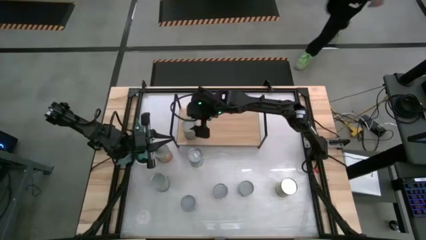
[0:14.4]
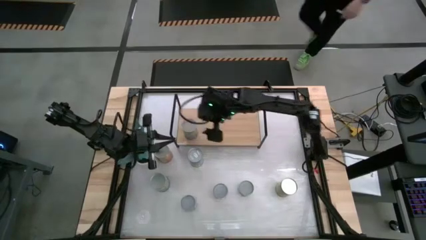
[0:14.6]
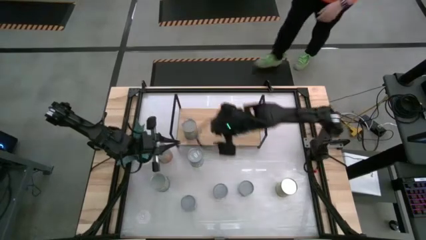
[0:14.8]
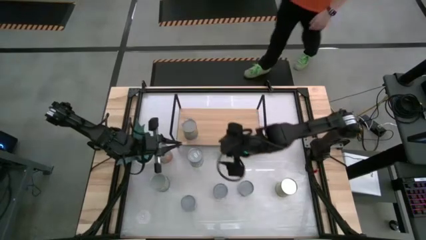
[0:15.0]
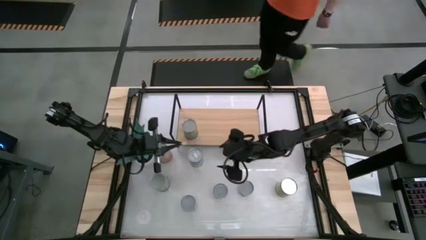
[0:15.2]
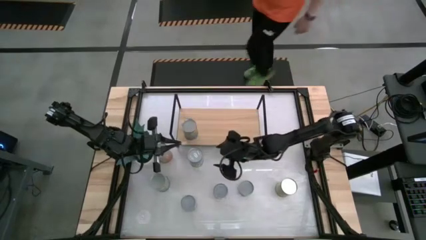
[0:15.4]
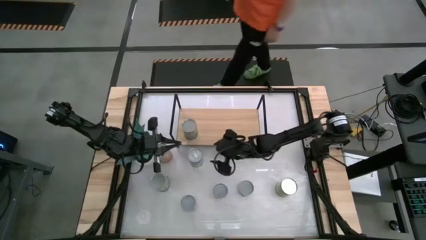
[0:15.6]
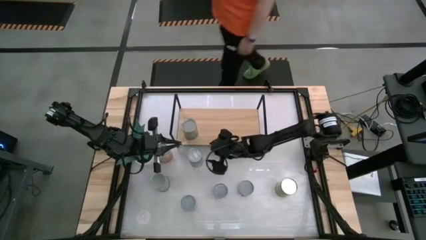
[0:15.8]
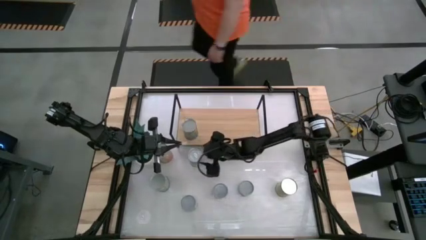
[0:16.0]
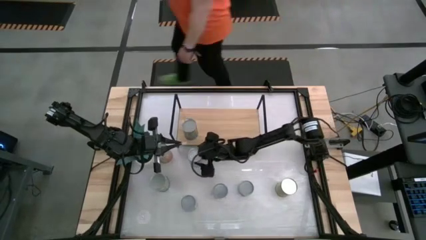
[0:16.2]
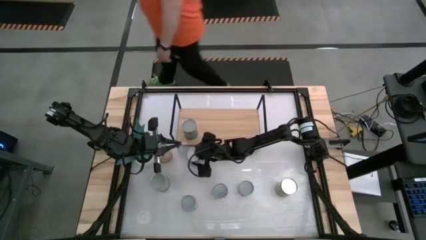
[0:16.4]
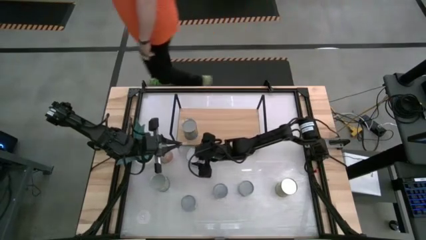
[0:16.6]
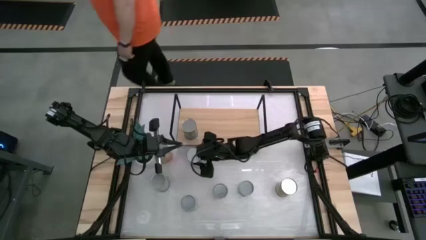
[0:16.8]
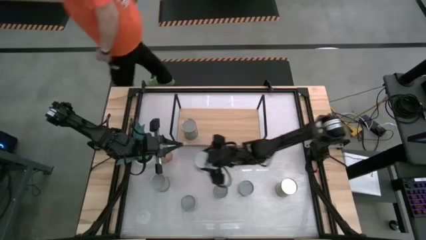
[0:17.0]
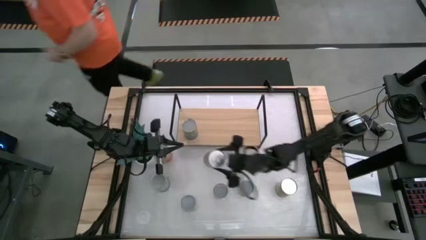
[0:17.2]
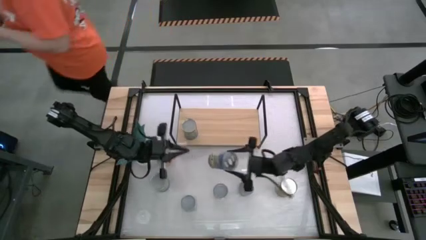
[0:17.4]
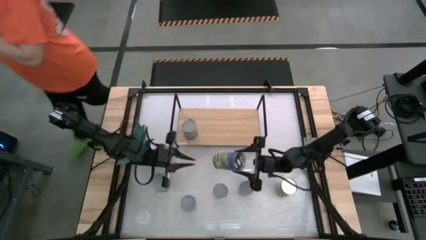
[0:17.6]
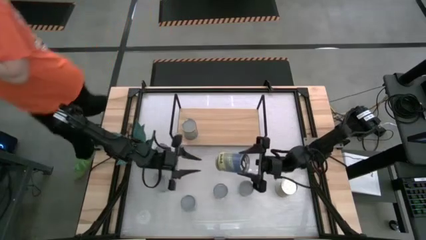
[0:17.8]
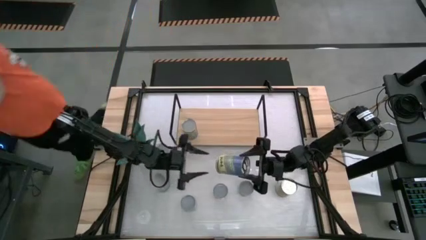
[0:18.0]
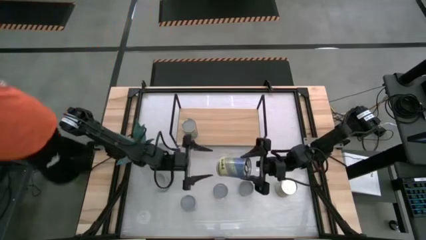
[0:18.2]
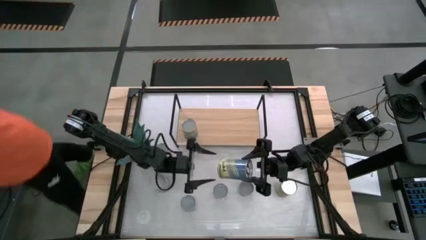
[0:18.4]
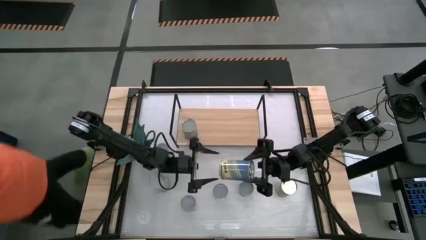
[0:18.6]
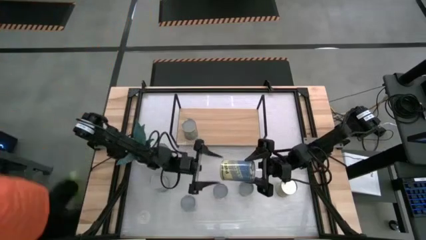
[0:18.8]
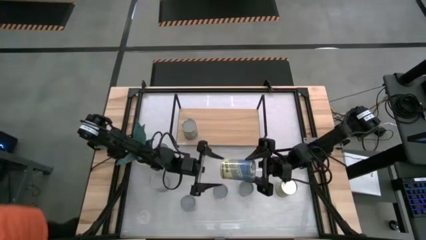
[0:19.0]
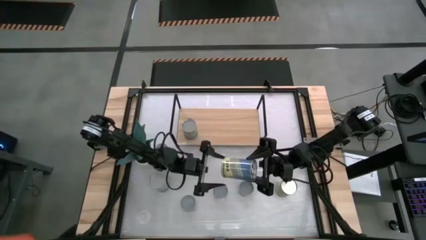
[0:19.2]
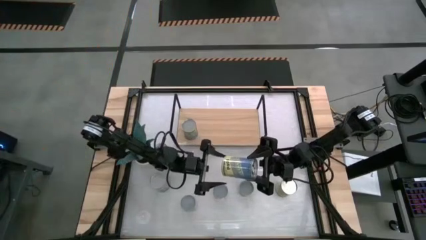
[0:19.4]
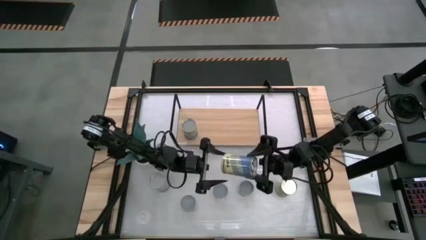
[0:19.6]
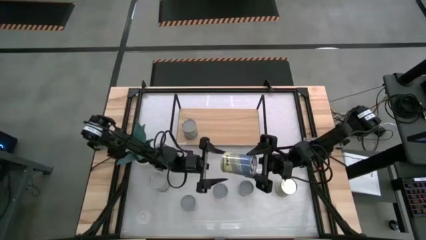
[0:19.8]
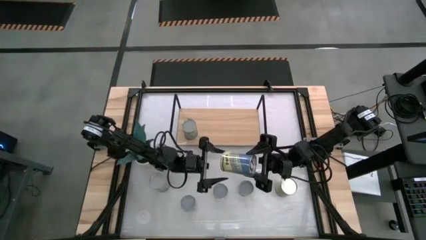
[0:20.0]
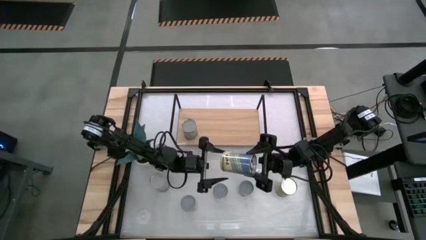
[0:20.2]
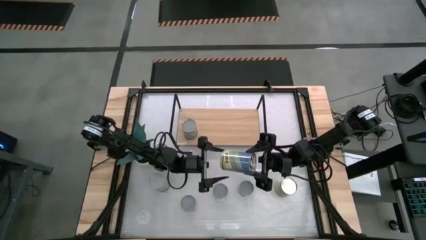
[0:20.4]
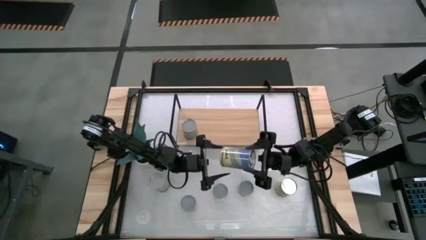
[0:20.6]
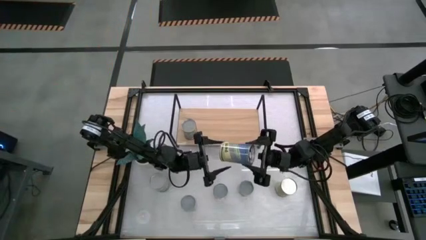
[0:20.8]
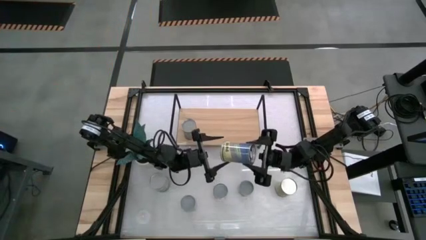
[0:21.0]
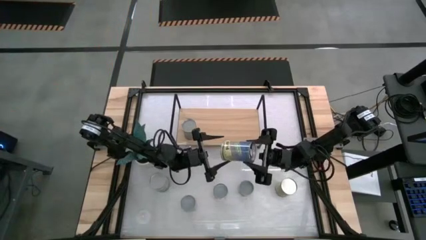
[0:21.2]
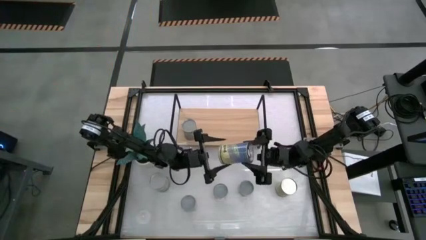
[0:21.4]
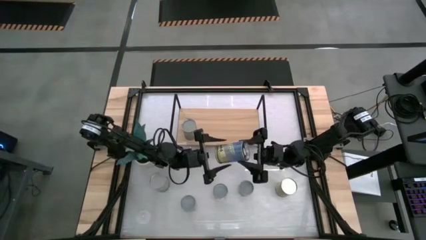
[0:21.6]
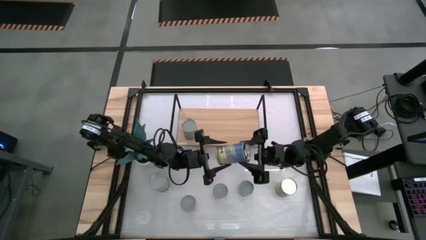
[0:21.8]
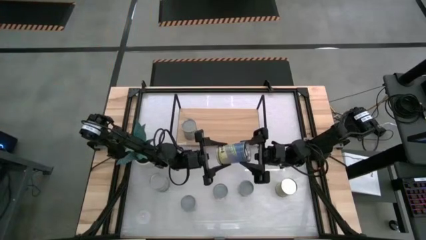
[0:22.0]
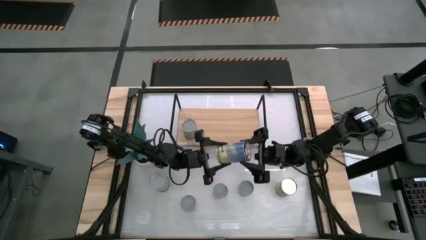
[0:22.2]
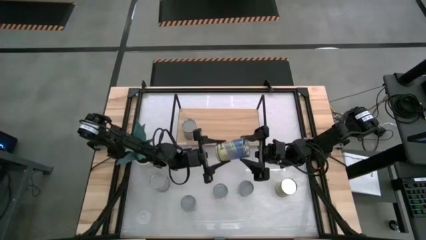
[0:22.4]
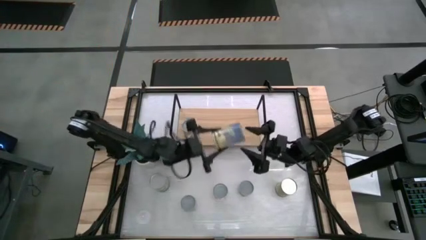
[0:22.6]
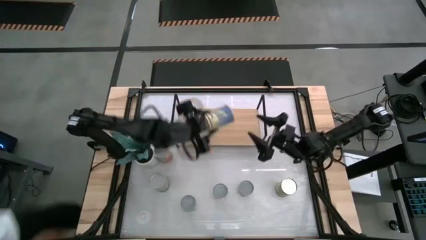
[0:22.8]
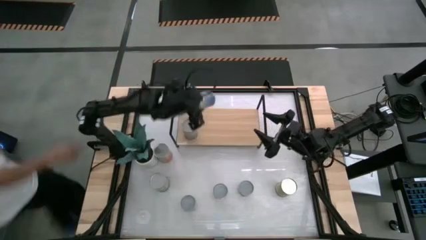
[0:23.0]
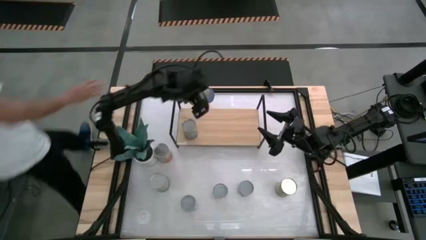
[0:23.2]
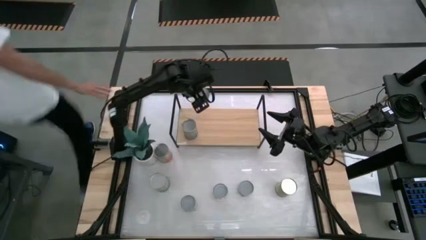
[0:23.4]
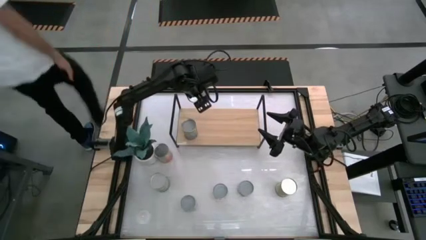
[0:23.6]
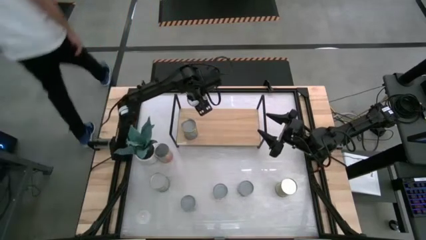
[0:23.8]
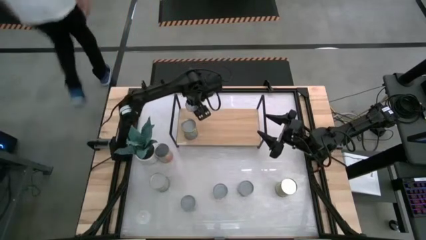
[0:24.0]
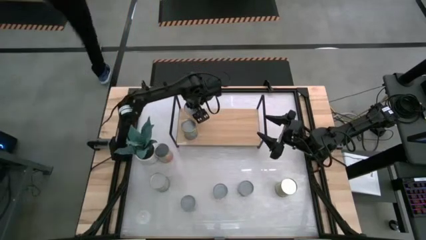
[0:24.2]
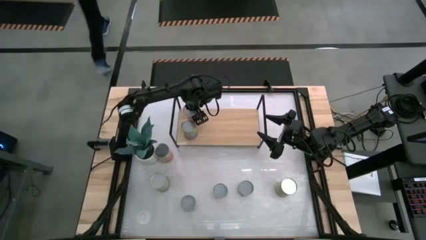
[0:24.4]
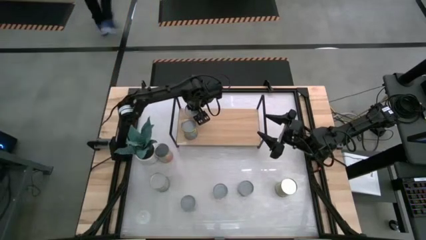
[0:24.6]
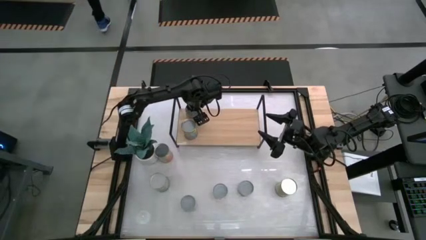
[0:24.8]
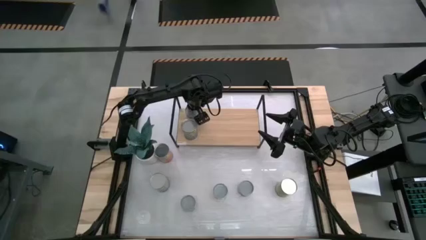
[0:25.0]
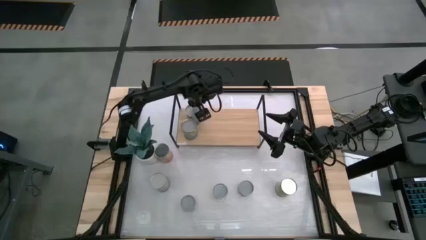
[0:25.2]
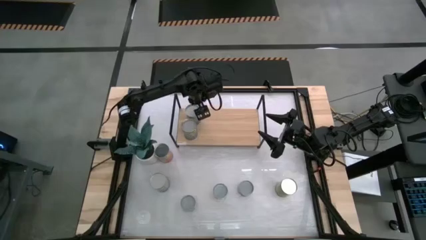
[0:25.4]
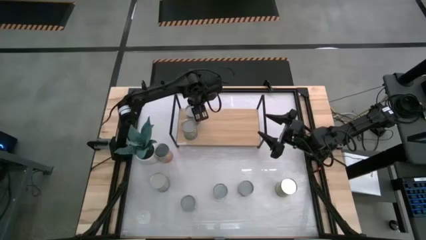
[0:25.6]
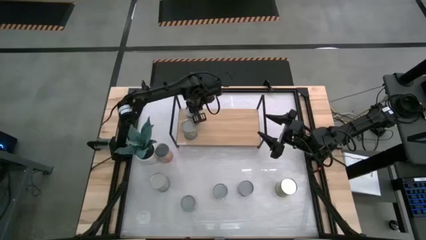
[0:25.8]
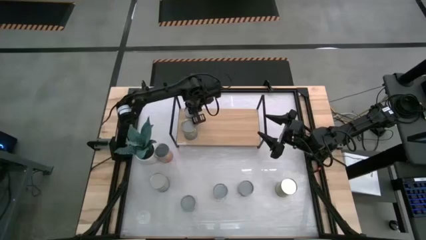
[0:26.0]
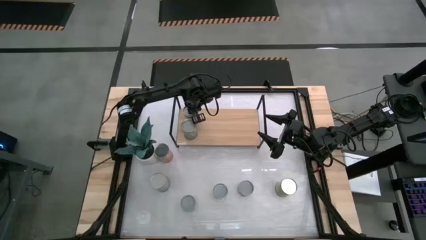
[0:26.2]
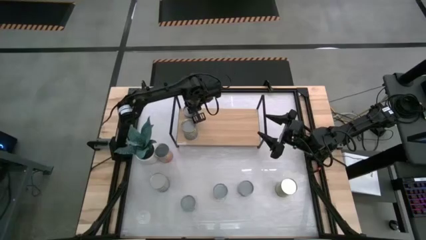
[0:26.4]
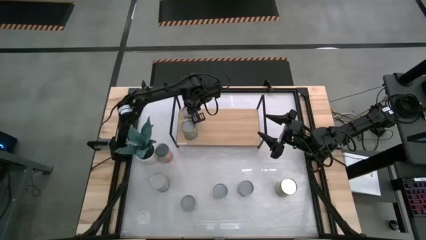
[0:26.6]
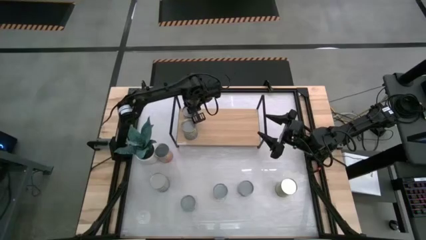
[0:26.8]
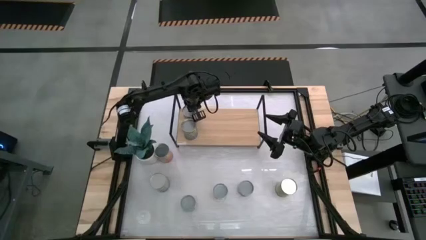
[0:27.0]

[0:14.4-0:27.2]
Task: Pick and place cans onto a shelf
Put the top large canned peas on the shelf

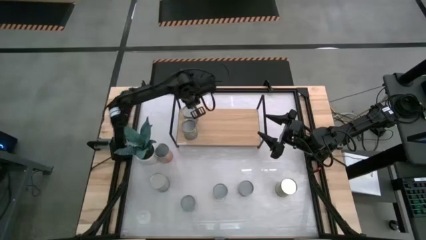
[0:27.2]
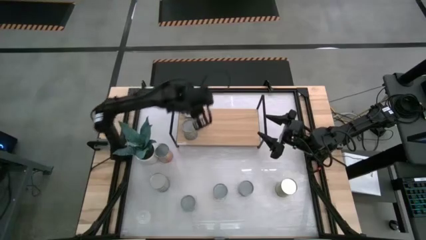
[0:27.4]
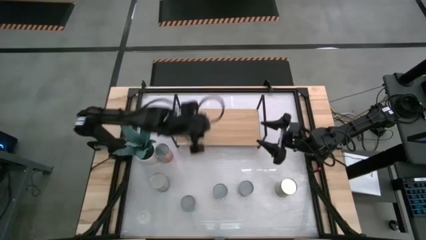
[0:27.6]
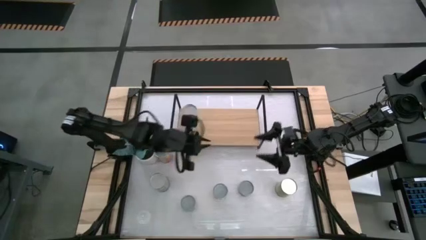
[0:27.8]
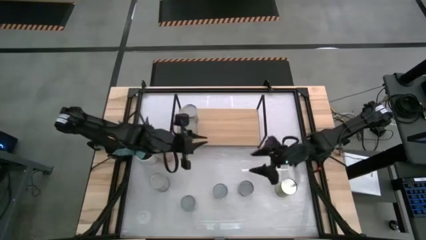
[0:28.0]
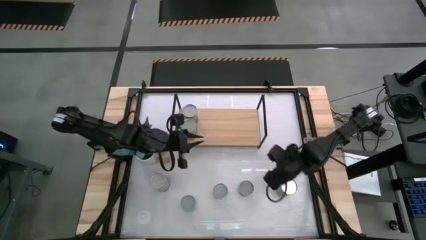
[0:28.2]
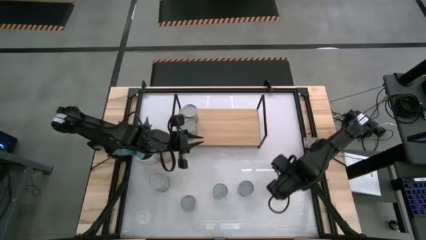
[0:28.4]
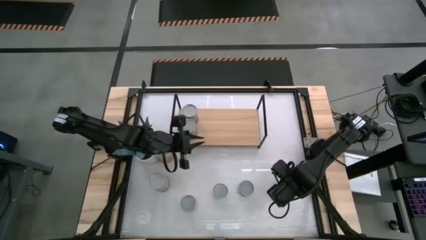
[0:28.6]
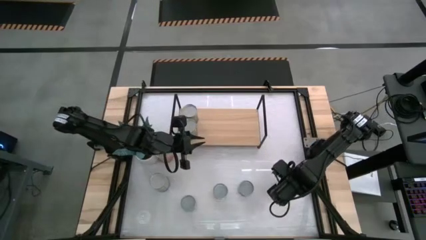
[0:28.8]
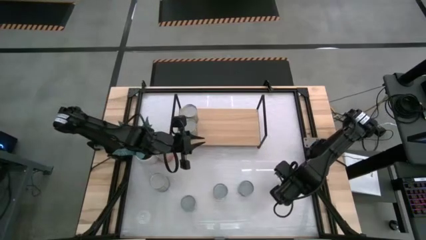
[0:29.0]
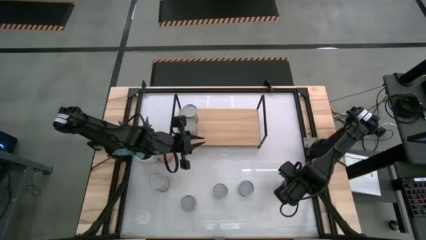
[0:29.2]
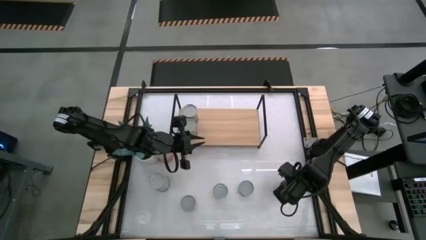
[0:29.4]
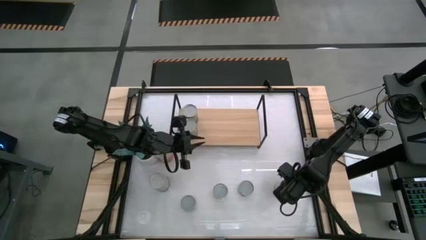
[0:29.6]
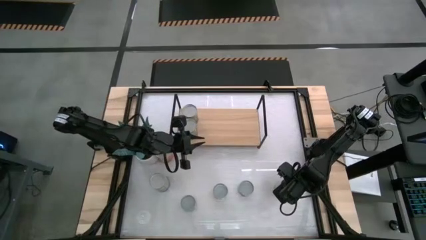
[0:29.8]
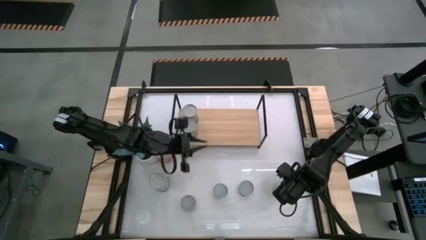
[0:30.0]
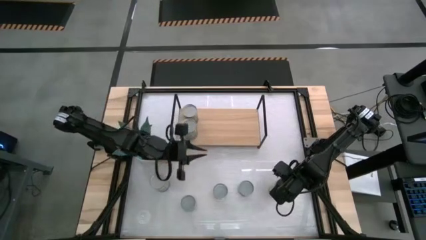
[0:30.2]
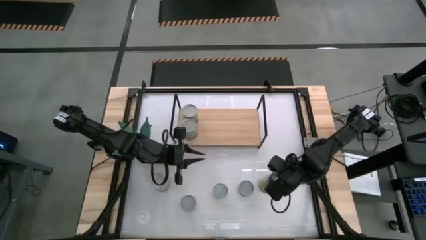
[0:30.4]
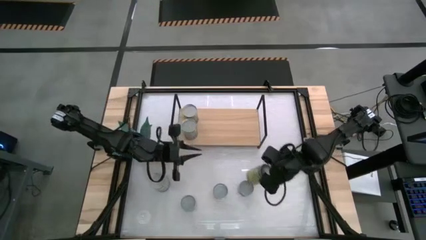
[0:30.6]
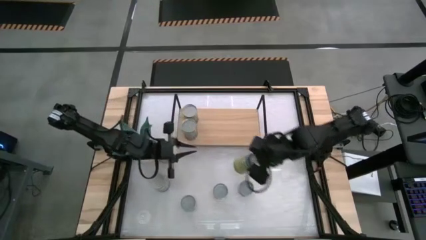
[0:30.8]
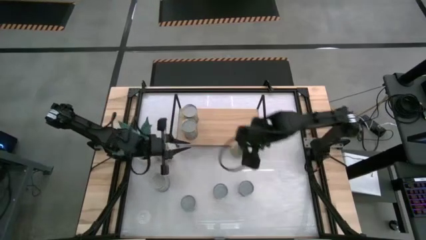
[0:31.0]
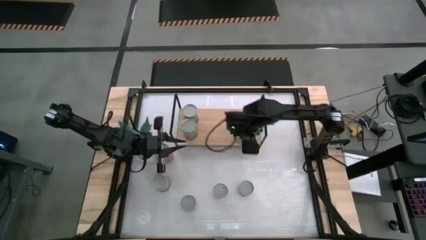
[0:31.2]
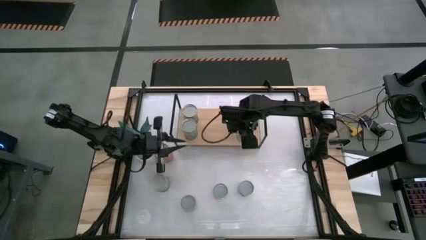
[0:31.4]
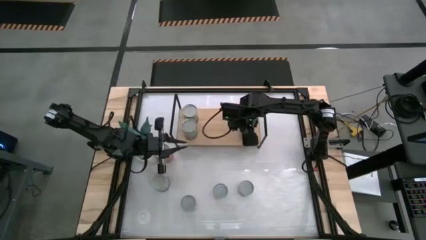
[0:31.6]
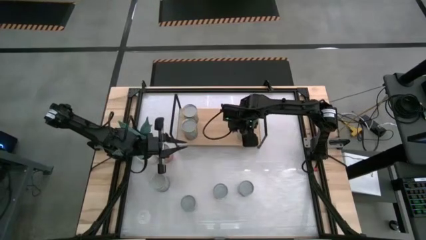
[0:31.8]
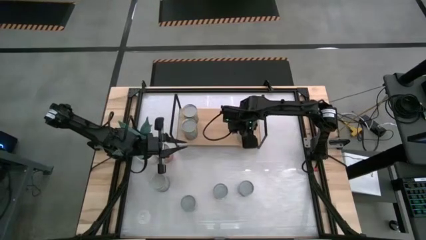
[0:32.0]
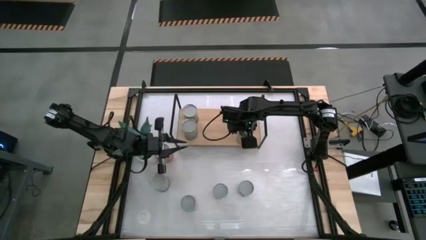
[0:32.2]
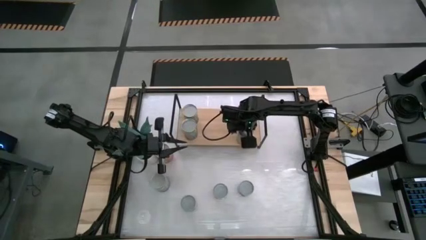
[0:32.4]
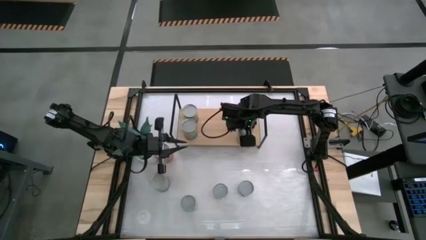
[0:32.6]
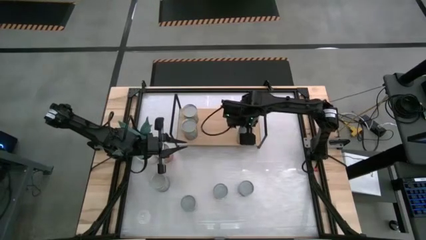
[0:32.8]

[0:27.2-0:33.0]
Put the large canned carrots on the shelf
